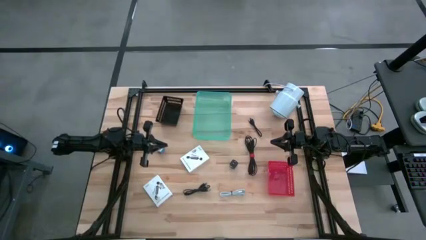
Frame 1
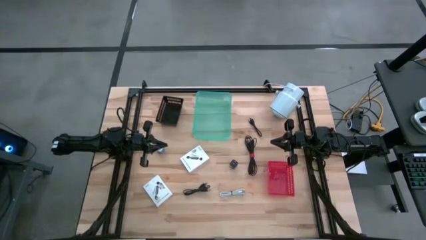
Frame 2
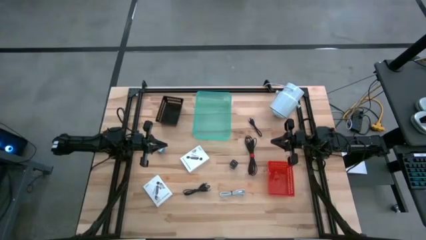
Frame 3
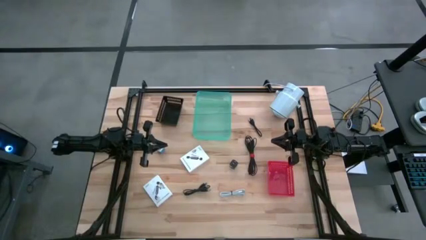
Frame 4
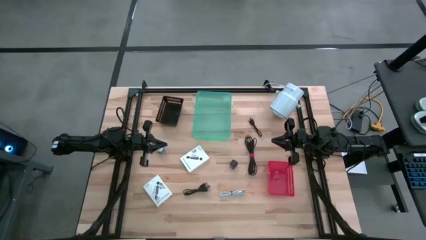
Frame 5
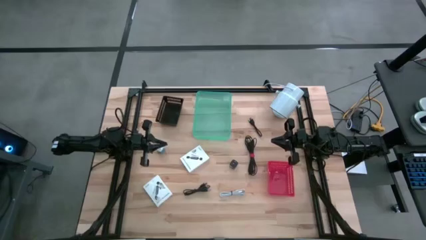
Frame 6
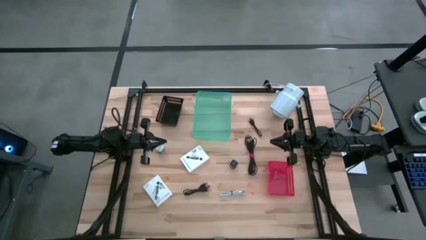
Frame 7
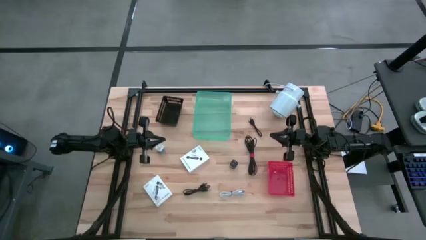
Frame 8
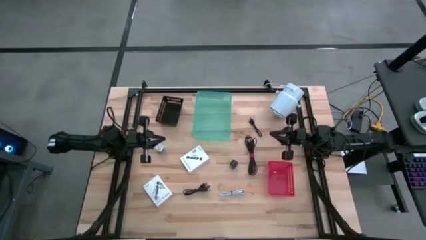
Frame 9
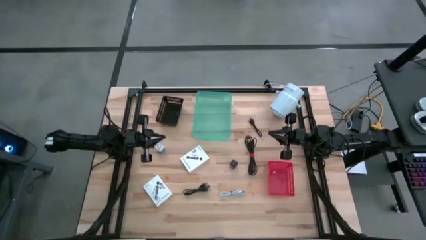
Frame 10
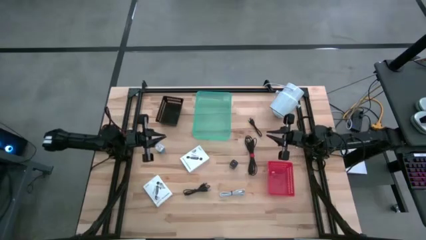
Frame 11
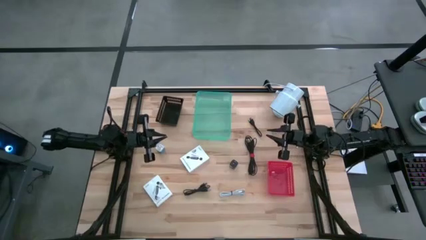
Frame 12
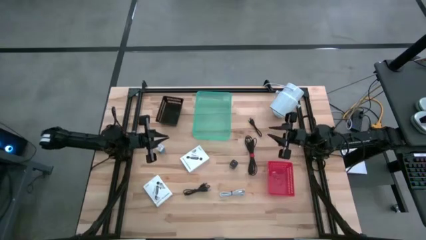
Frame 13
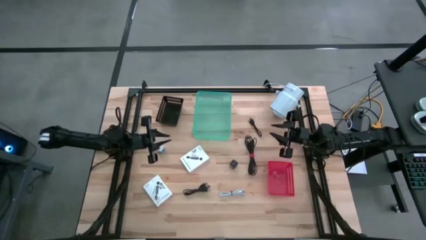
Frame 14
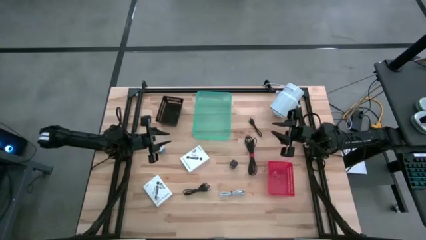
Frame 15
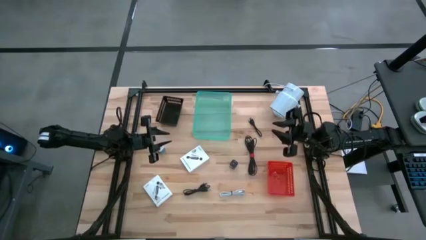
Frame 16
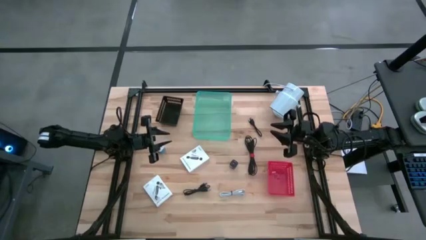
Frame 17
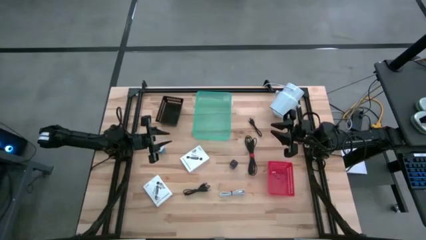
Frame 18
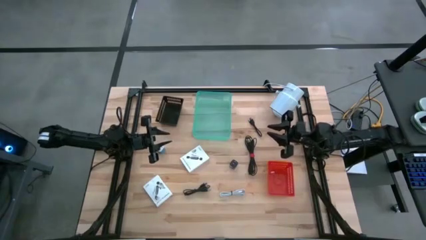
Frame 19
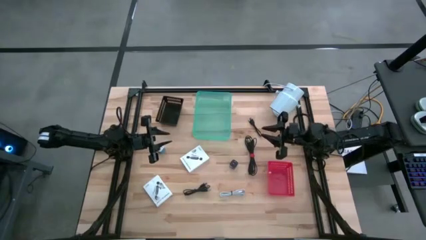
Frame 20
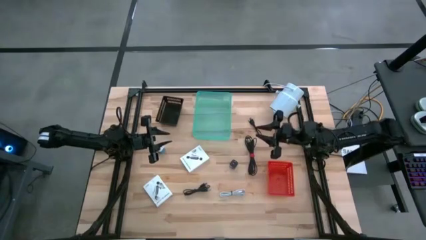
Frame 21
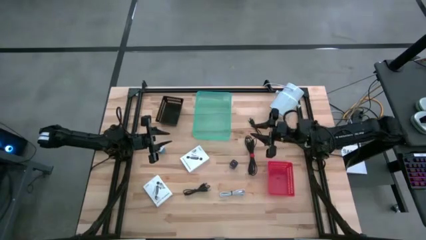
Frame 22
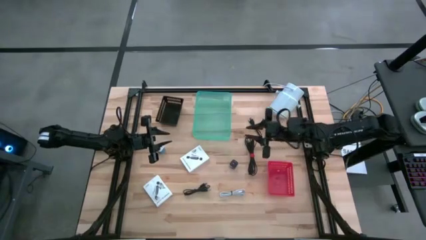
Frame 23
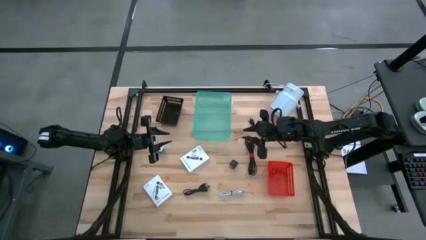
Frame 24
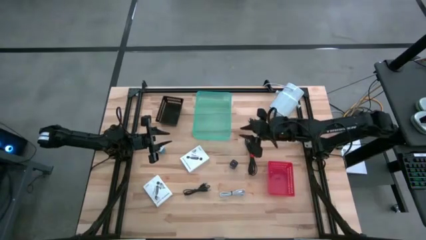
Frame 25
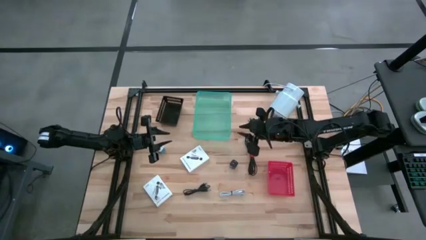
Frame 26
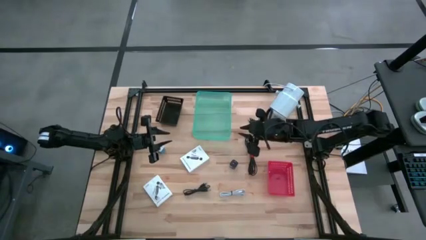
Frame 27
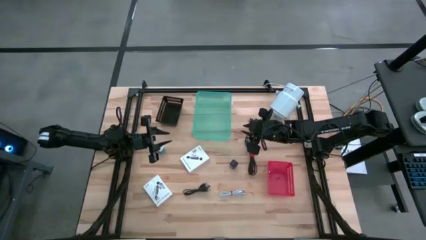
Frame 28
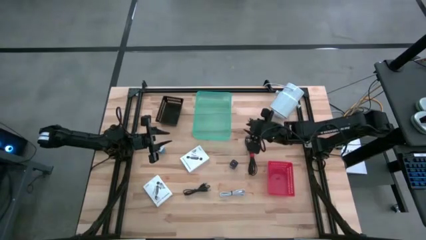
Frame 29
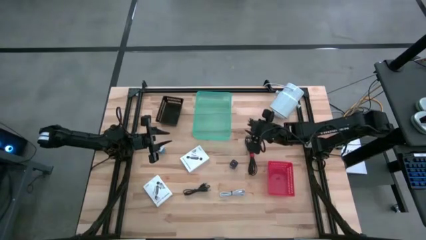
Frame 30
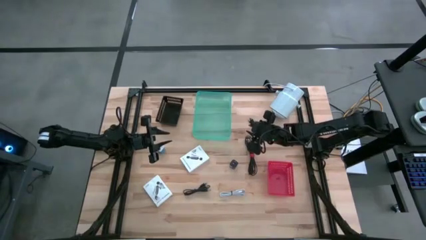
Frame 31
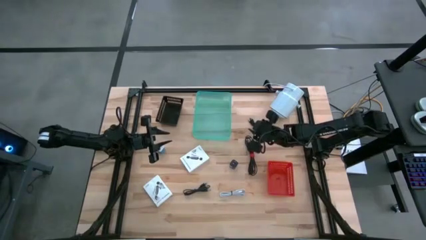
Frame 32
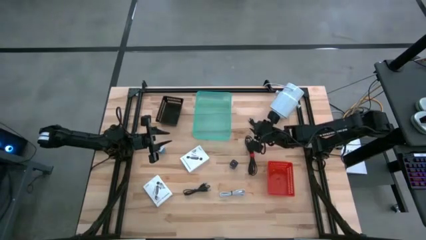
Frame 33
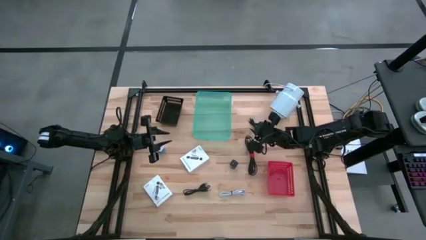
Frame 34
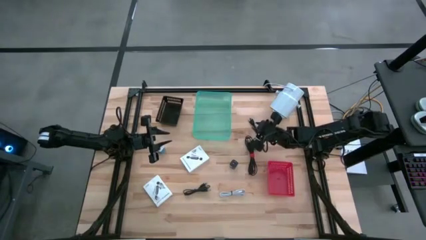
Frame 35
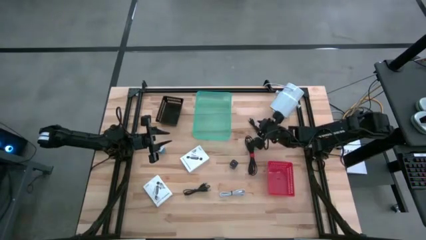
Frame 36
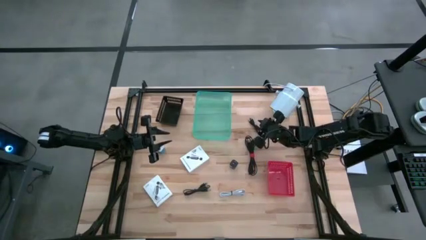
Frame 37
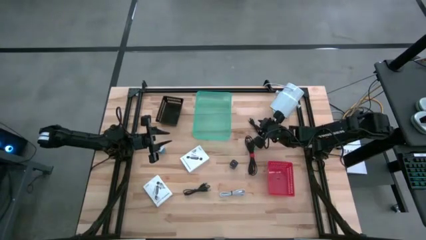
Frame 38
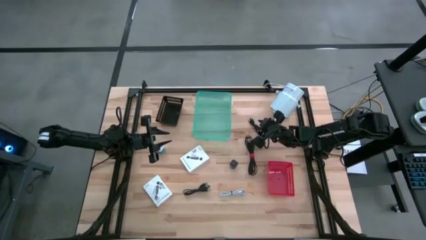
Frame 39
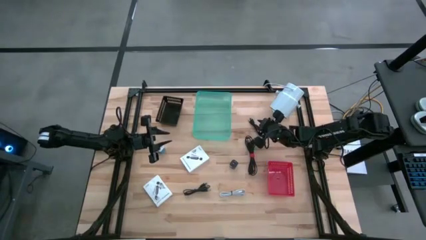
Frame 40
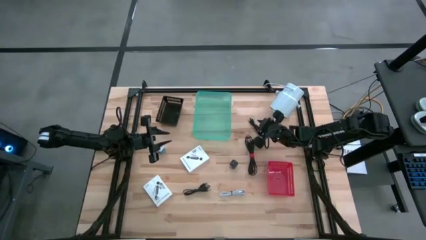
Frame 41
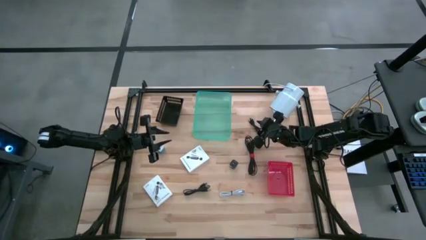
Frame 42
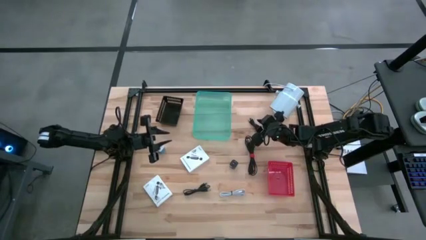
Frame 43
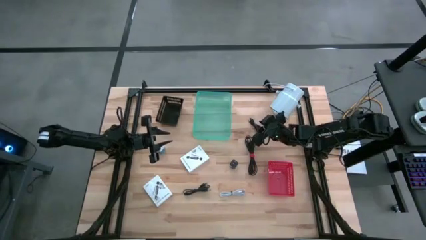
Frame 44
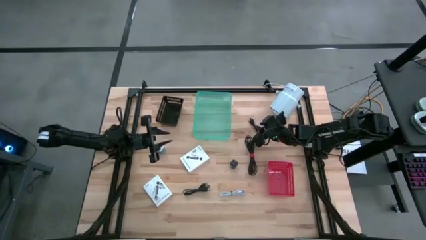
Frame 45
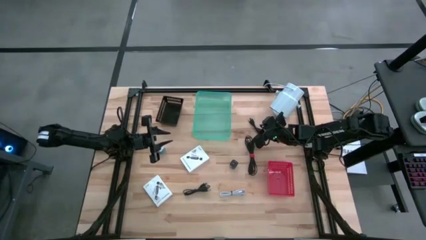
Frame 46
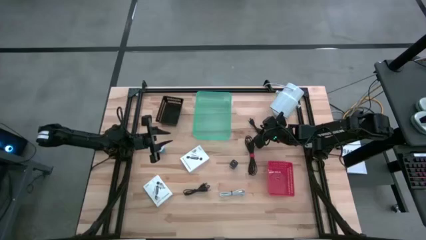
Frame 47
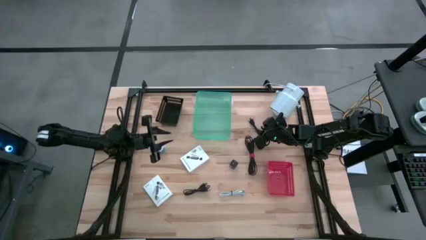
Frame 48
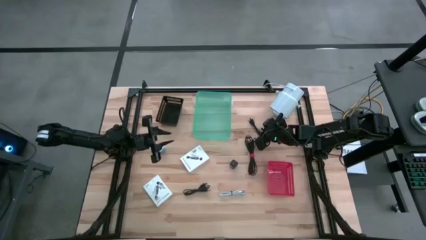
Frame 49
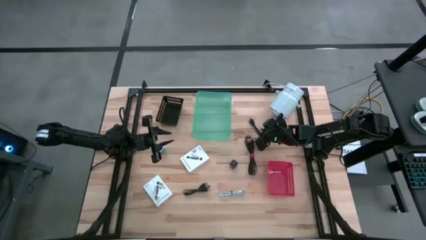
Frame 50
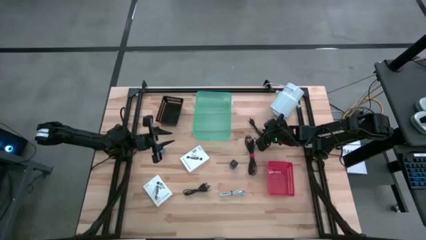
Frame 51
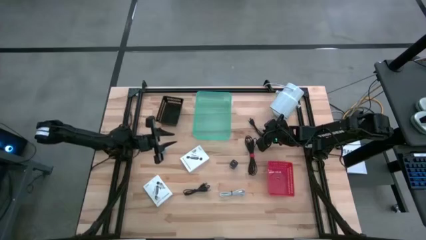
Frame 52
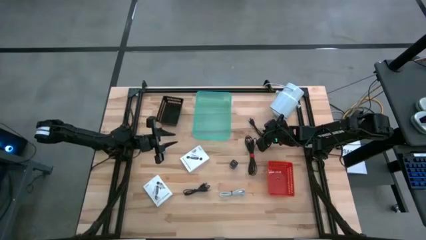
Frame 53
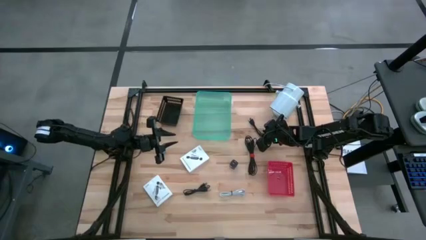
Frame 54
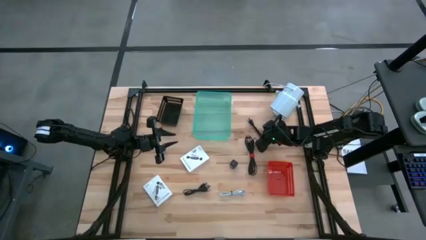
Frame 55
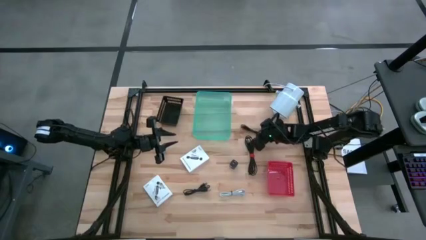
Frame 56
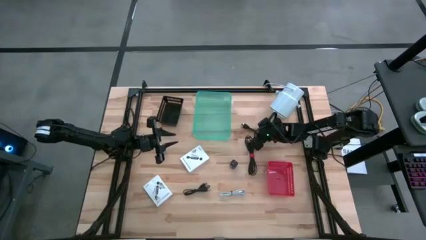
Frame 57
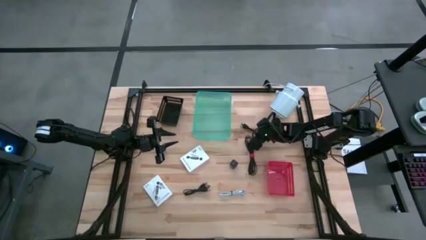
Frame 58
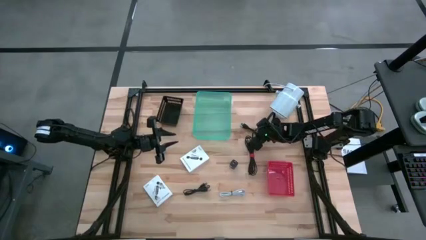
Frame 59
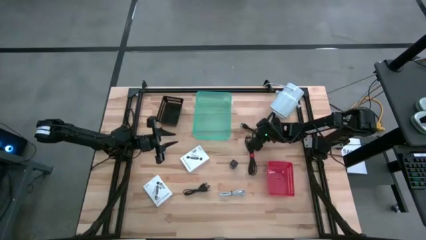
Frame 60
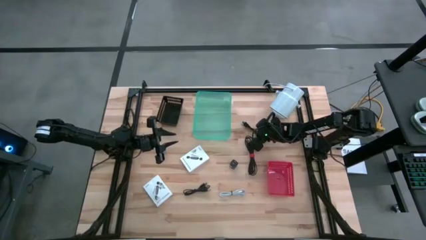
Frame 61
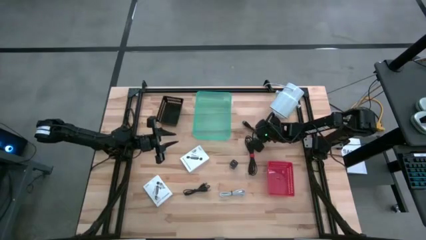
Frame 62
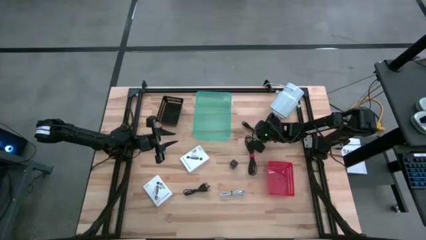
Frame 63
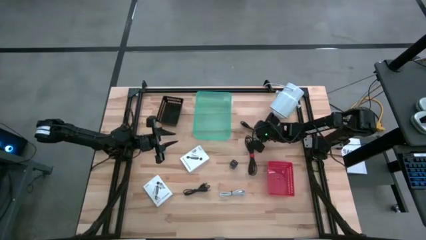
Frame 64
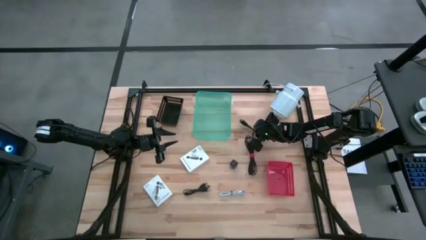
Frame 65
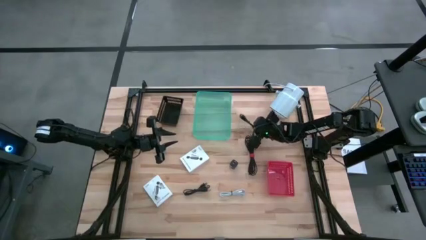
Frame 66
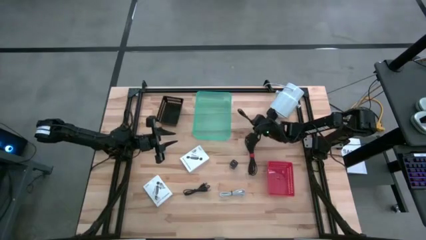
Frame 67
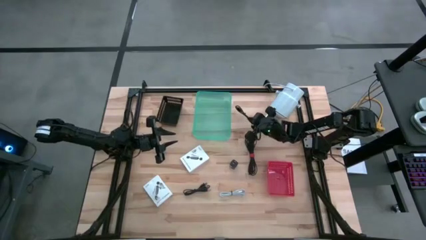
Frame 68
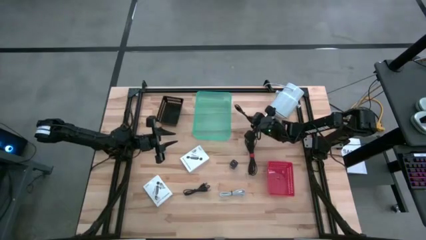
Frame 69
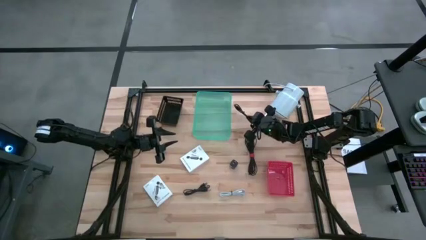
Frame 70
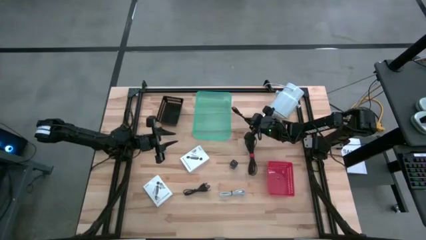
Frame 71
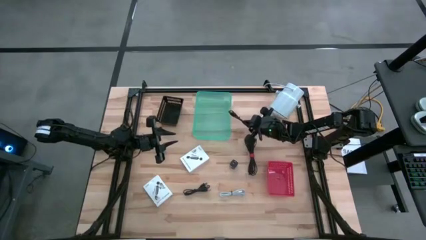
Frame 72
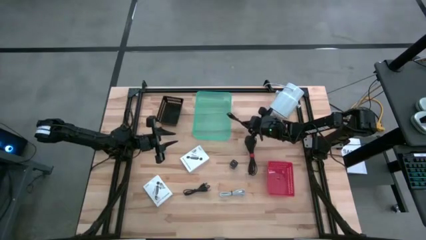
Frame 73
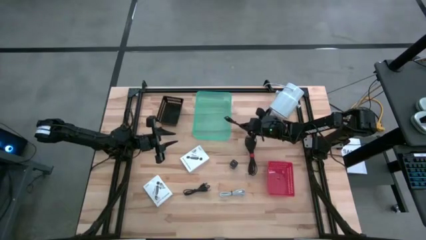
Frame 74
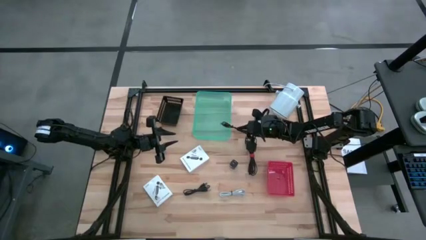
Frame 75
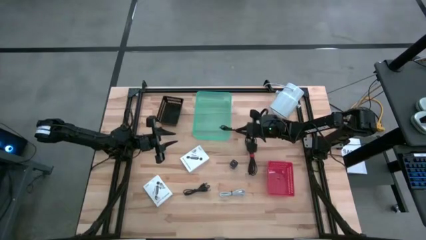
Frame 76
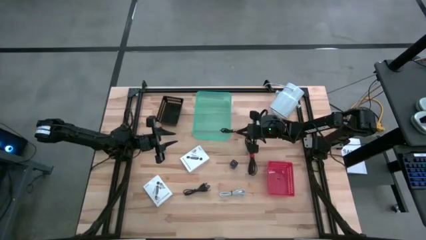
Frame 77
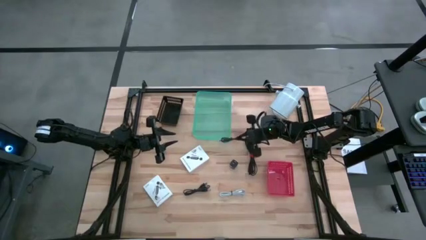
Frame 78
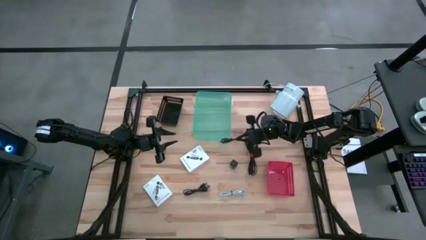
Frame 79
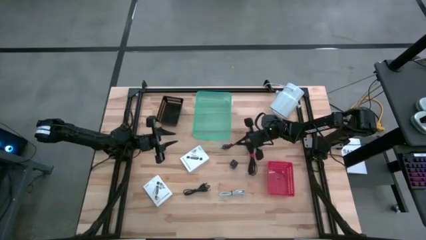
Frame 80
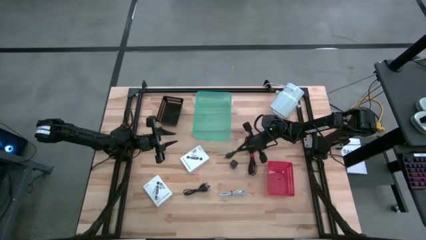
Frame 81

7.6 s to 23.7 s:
Task: Pick and place items into bin
Put the top black charger cable into the green bin
